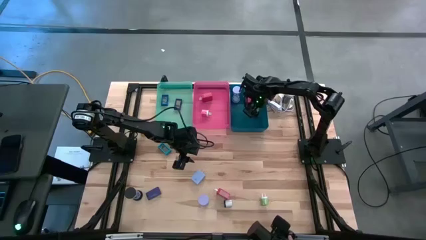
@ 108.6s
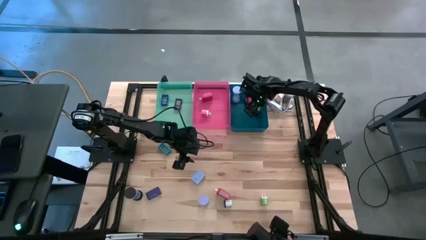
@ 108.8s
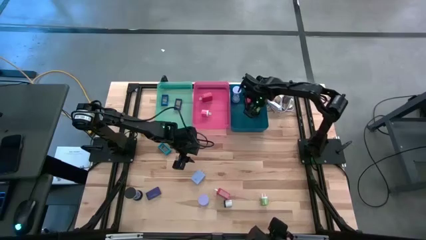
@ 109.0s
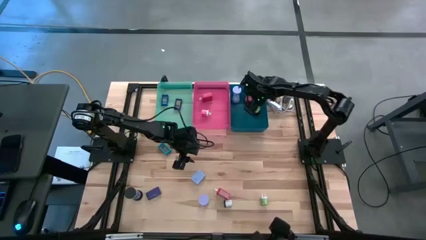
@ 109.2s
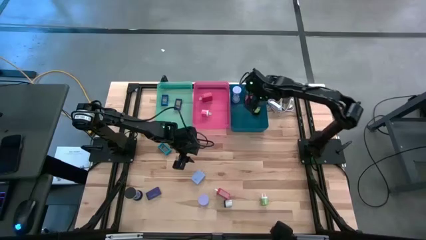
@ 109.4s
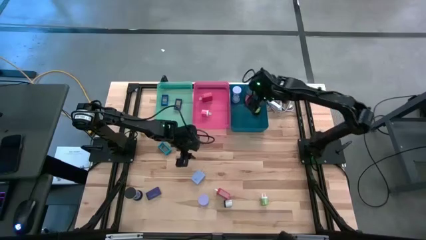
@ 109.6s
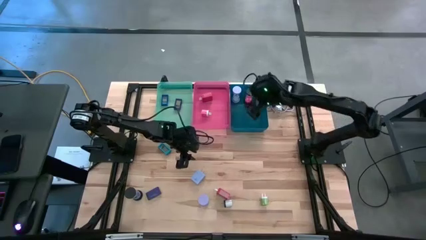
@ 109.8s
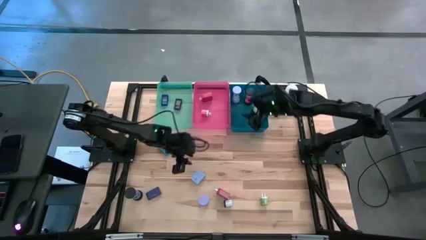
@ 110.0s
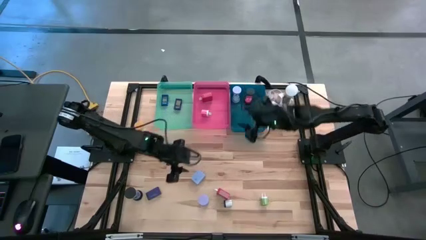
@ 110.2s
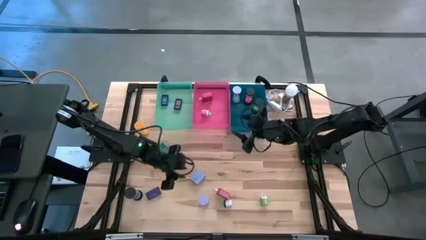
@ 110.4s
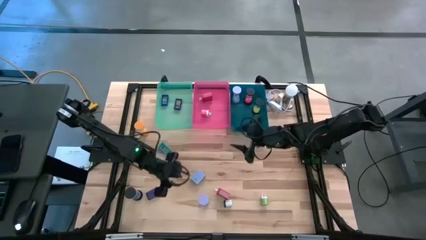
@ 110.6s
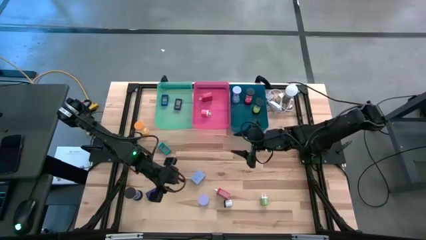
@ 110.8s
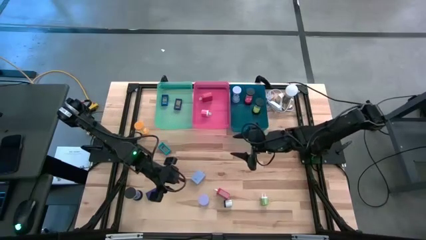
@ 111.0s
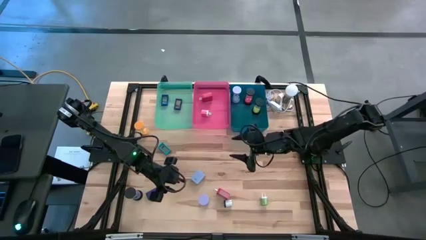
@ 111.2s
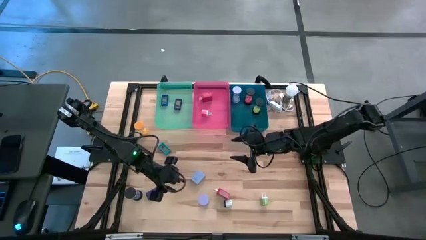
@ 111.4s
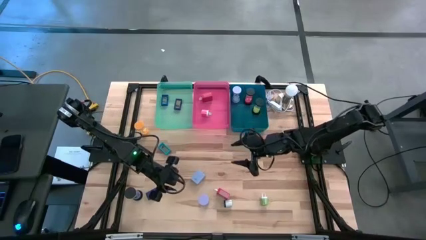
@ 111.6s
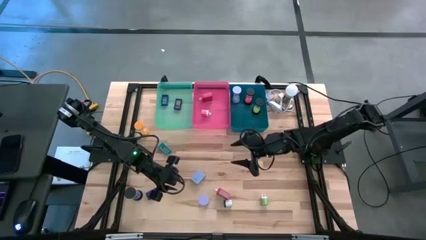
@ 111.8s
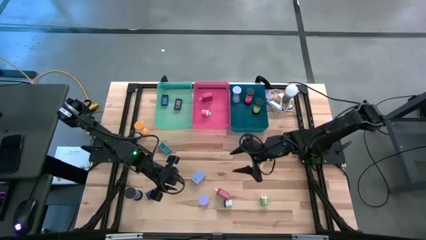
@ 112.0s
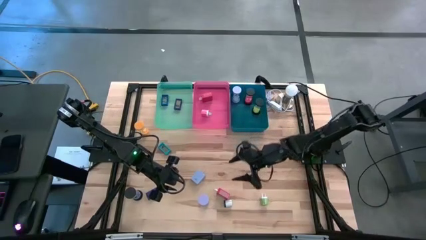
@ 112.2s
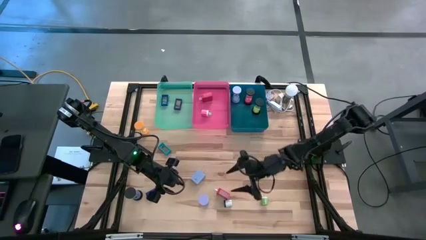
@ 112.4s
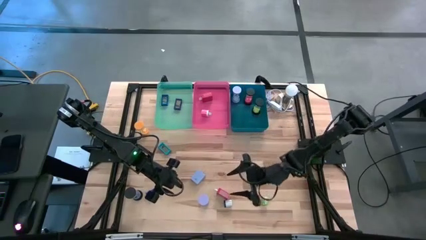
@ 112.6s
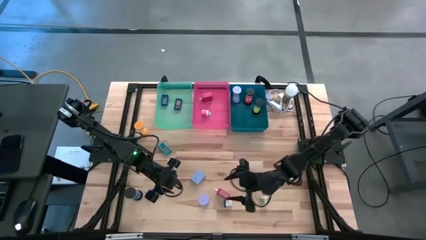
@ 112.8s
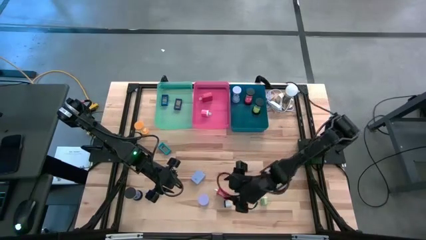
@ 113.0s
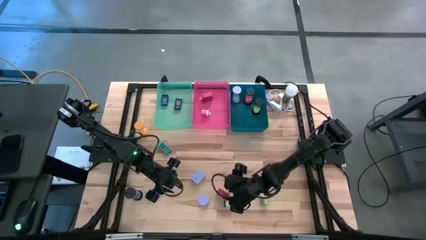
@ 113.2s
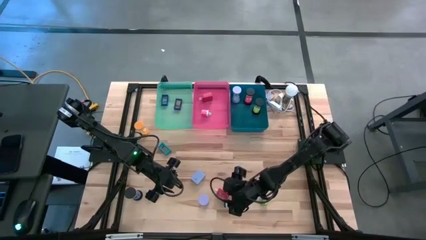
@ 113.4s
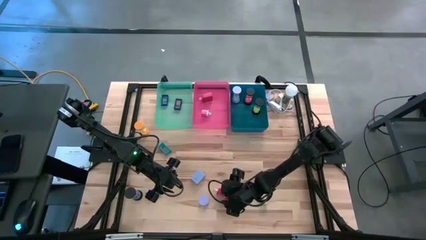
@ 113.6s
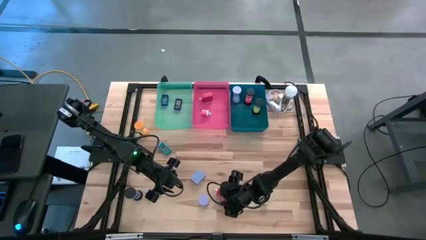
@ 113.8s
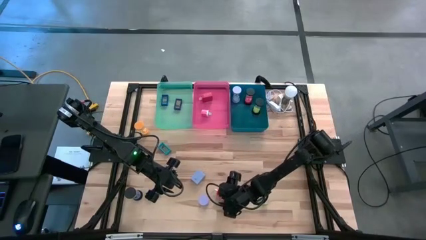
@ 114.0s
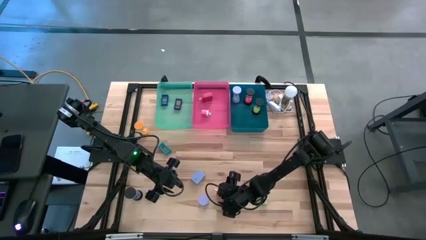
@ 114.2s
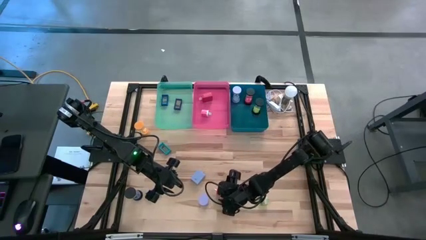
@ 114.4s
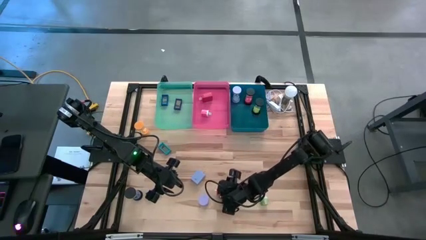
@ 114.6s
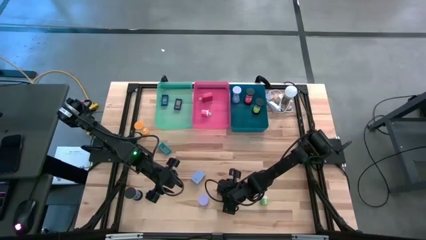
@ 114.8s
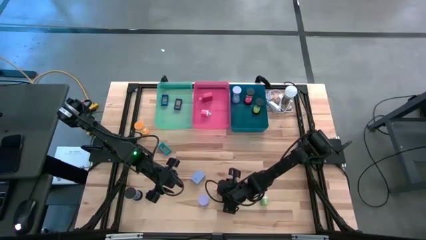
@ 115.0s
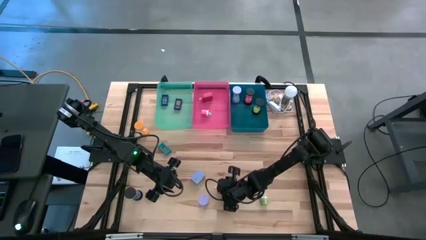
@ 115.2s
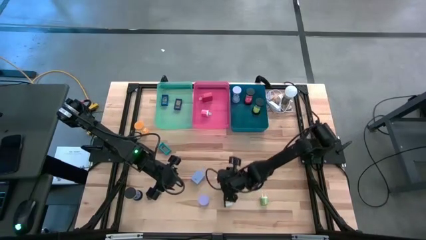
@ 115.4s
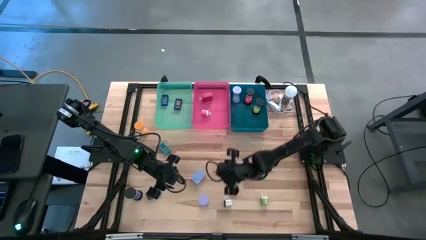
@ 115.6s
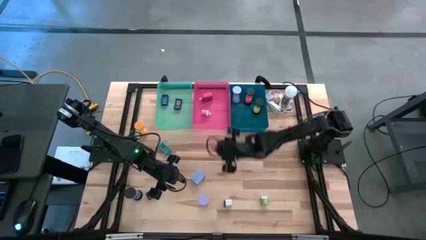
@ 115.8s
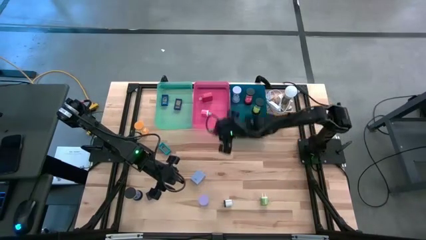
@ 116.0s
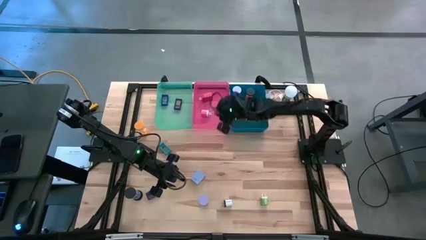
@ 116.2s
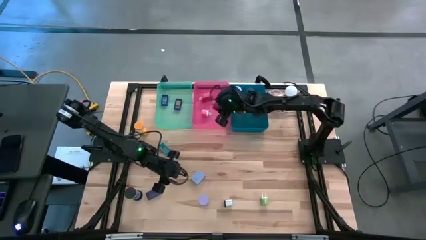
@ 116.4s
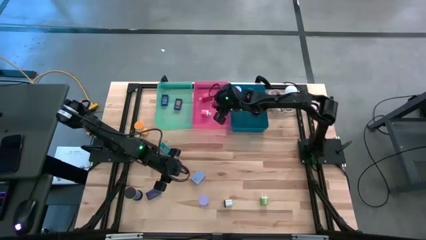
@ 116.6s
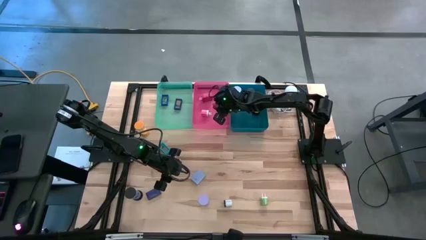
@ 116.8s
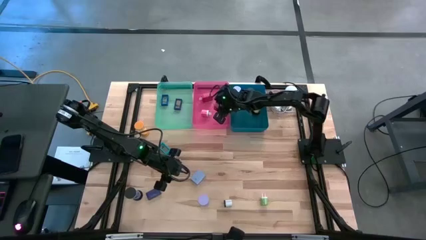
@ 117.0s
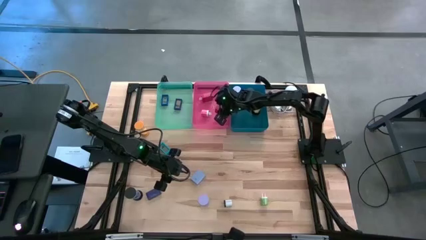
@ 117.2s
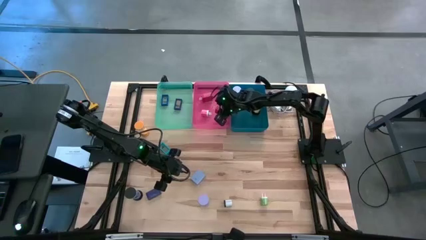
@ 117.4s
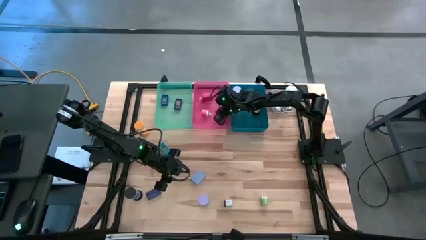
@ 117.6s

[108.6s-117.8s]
Task: Pick & Place Office items
Put the big red adapter into the red bin

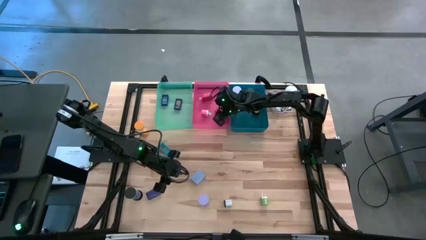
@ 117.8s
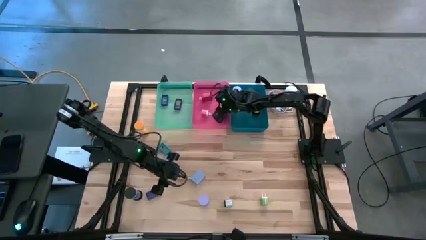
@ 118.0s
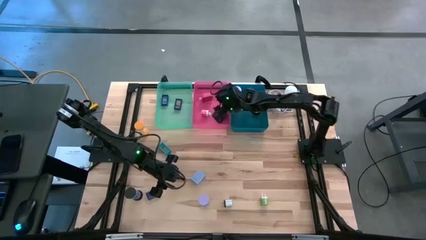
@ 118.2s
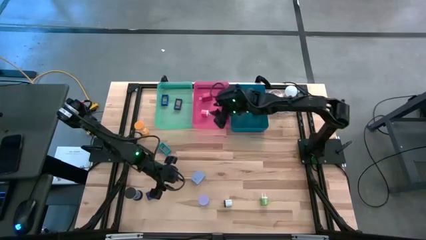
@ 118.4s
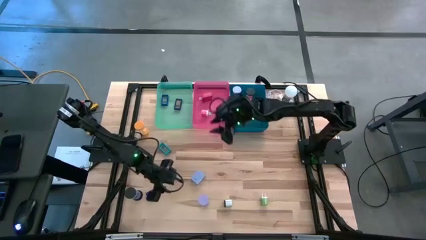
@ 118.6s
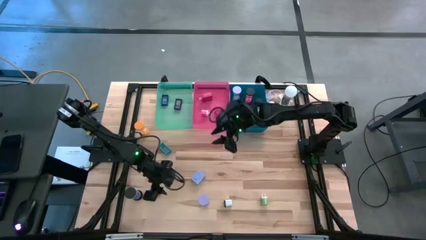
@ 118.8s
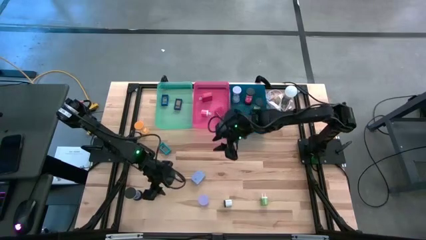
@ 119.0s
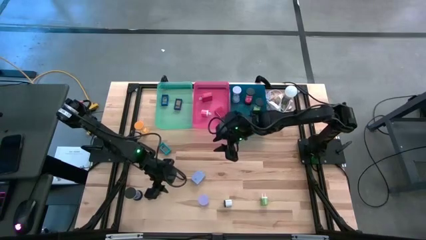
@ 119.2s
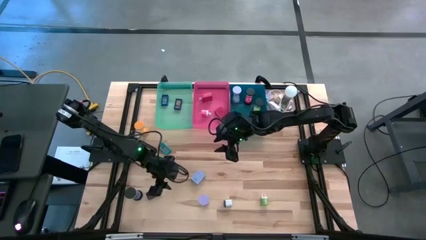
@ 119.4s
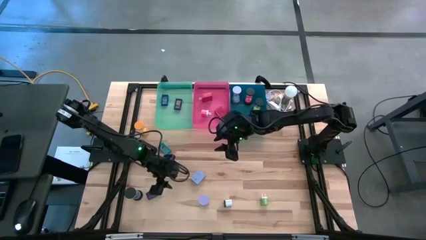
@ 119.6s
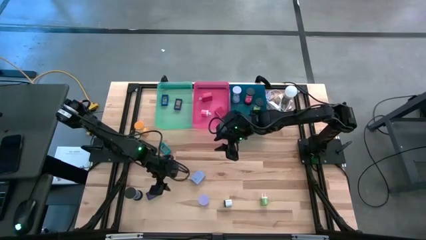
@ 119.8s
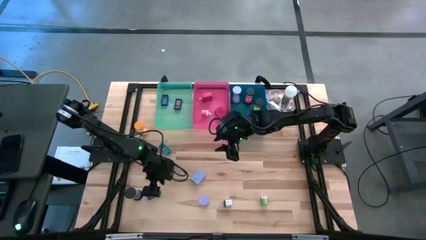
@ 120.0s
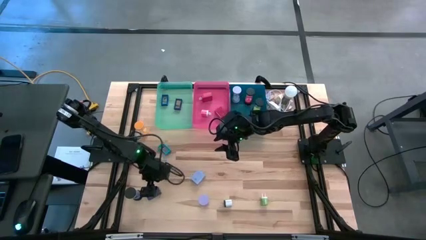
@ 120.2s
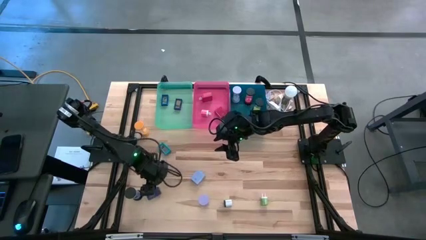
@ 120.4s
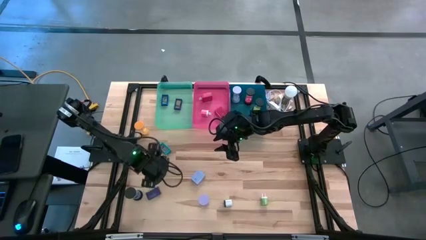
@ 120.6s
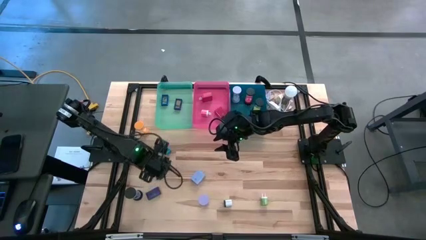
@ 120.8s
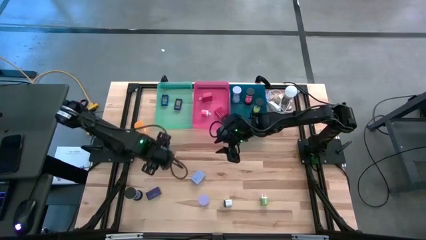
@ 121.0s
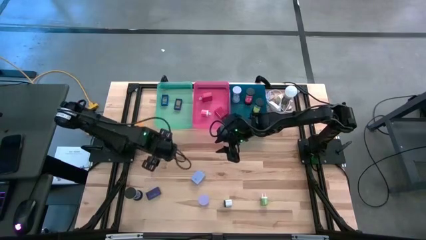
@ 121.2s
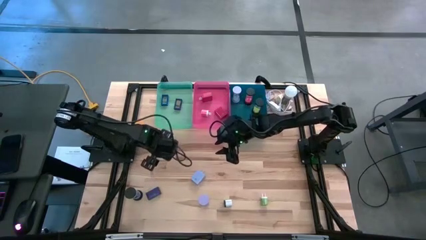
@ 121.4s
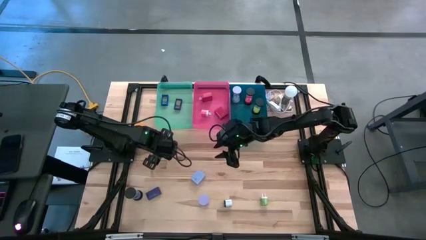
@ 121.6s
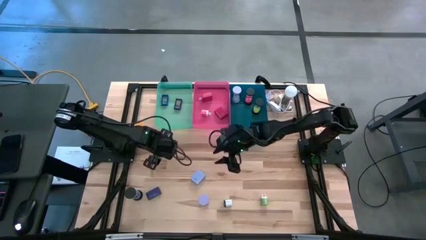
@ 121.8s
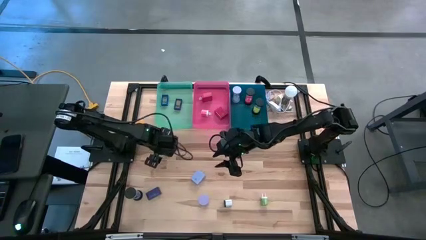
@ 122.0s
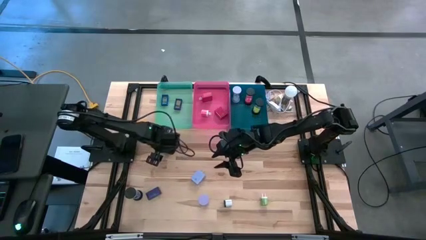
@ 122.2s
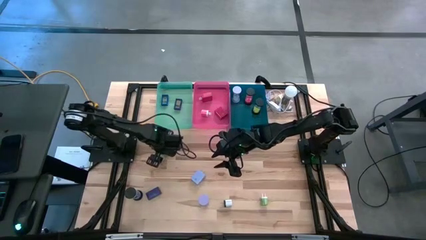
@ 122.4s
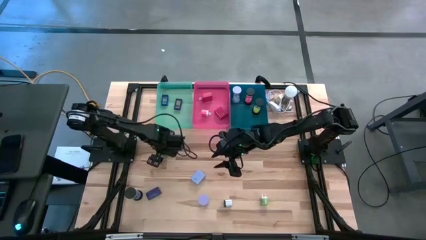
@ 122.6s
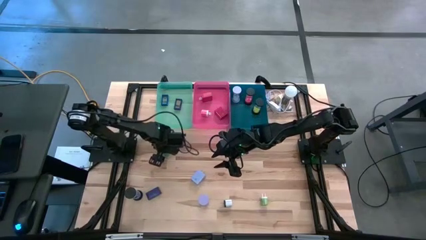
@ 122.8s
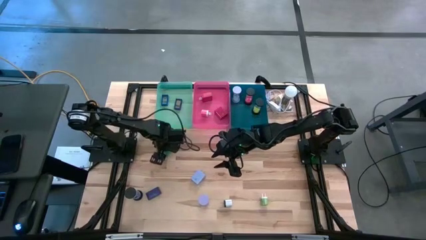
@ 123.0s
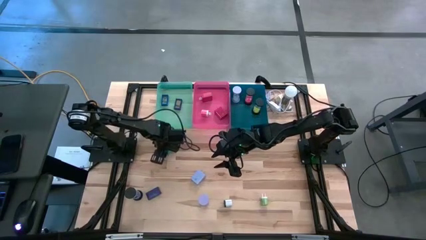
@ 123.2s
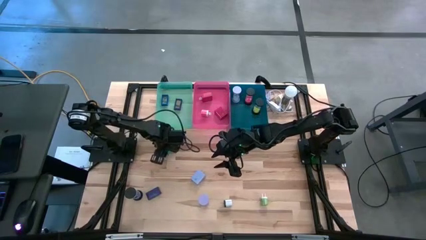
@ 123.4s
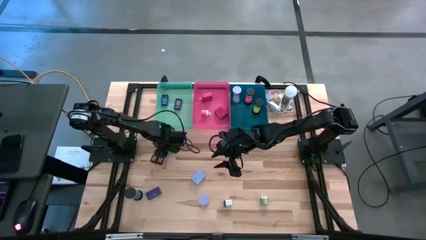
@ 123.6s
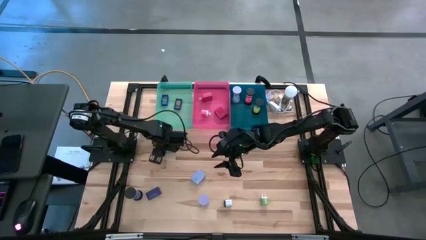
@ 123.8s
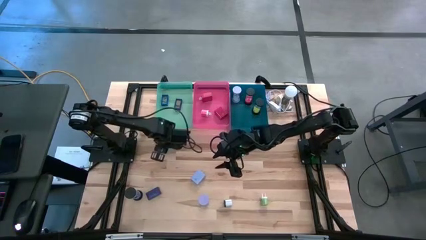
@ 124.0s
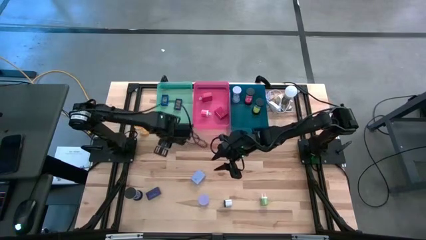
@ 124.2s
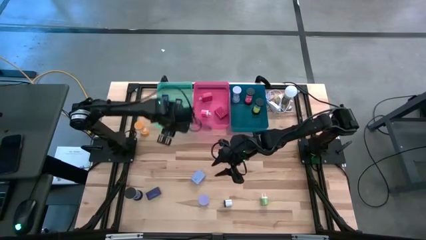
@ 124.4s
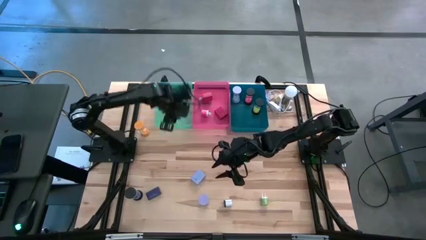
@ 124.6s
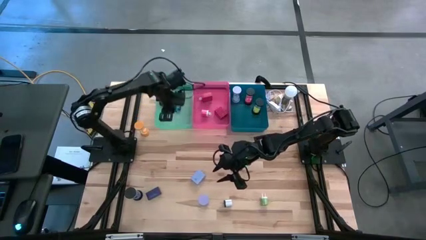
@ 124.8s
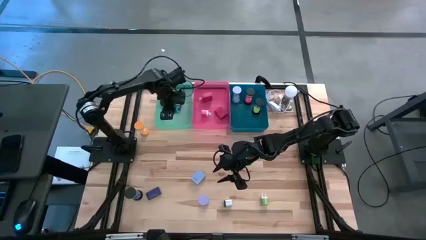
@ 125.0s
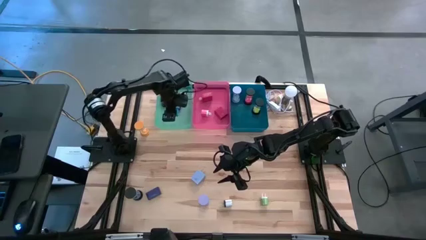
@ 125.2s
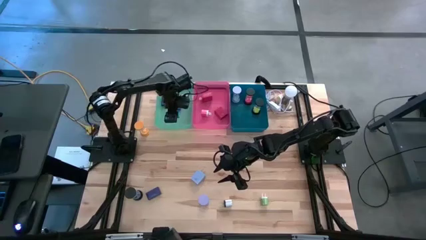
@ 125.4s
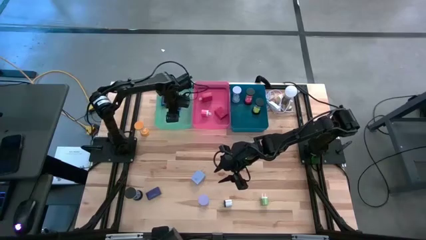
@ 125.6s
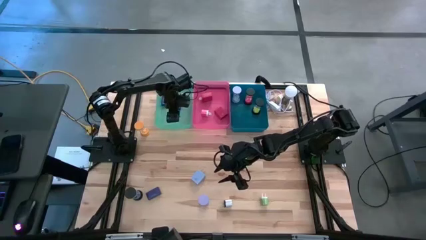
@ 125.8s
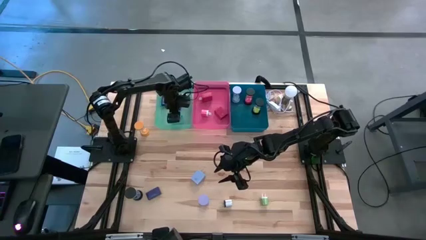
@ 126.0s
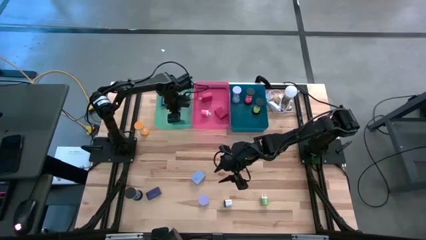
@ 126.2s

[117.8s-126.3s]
Put the light blue alarm clock into the light blue bin
